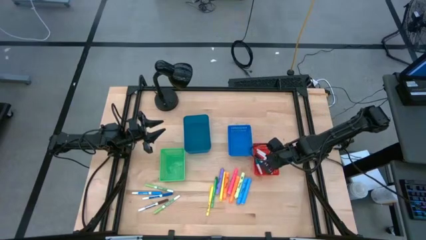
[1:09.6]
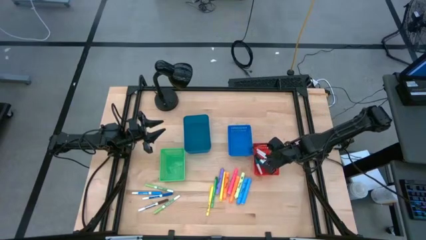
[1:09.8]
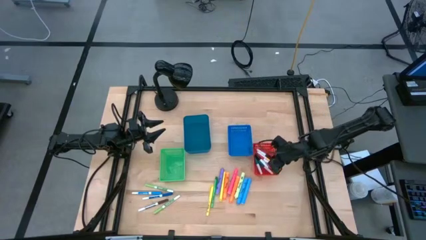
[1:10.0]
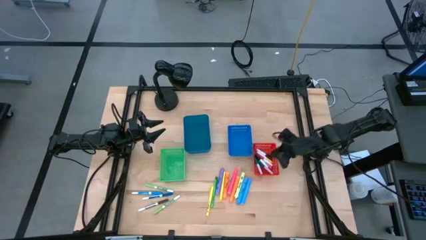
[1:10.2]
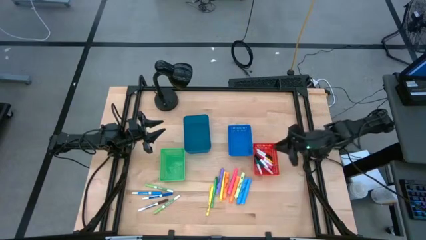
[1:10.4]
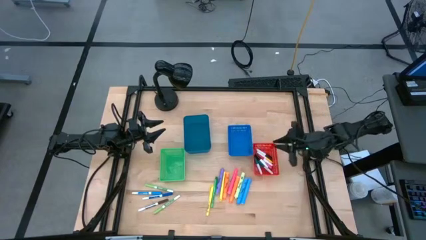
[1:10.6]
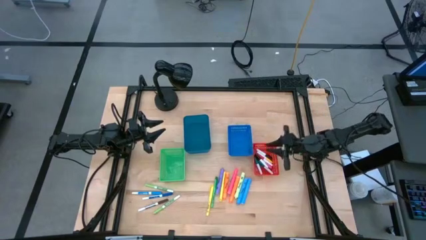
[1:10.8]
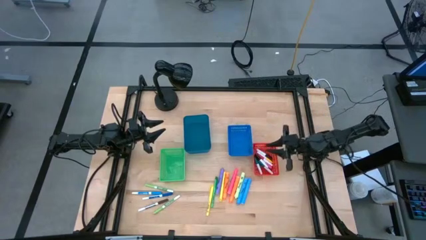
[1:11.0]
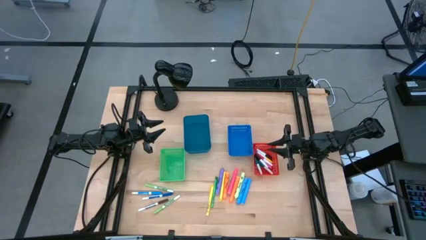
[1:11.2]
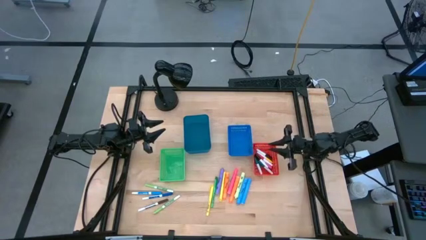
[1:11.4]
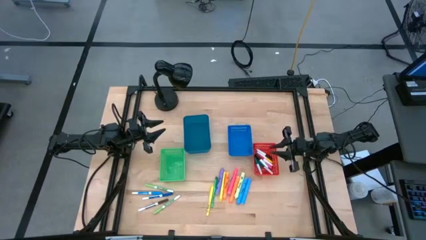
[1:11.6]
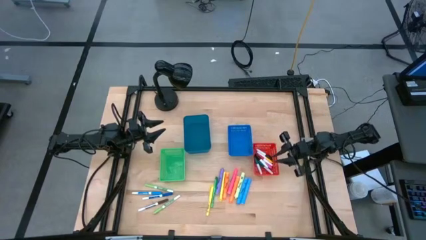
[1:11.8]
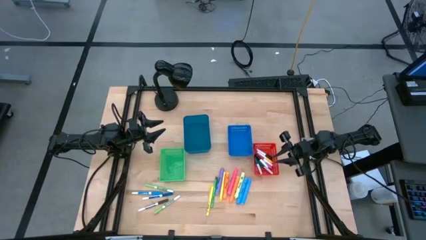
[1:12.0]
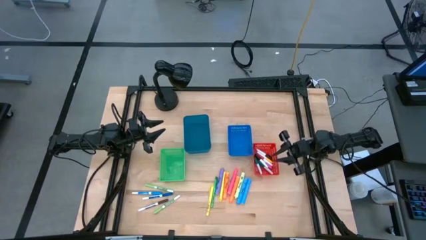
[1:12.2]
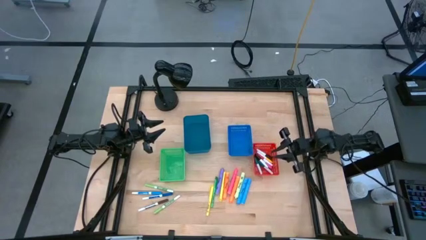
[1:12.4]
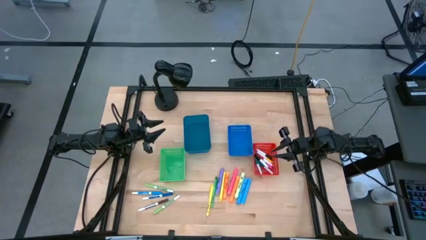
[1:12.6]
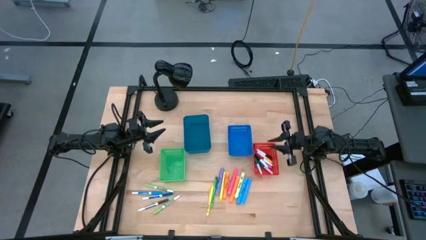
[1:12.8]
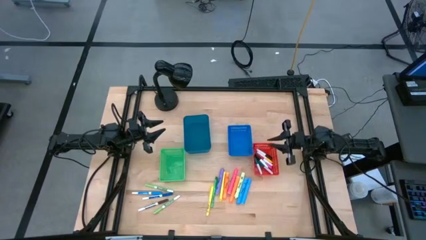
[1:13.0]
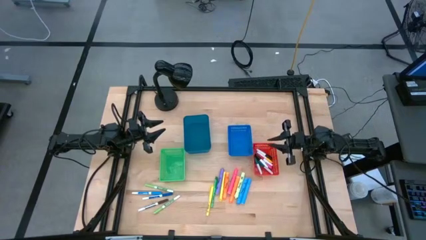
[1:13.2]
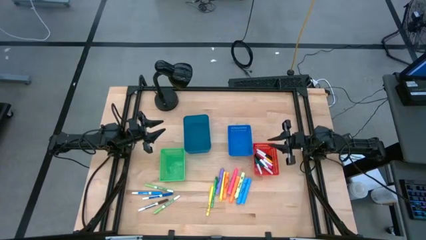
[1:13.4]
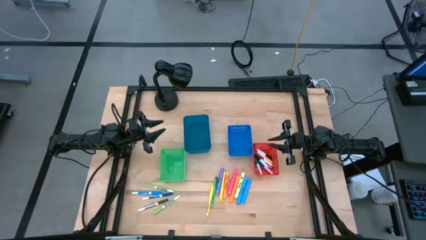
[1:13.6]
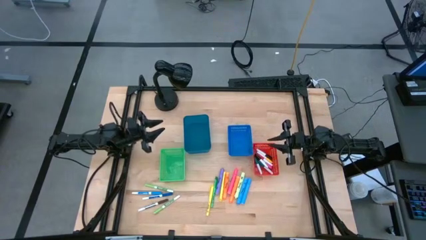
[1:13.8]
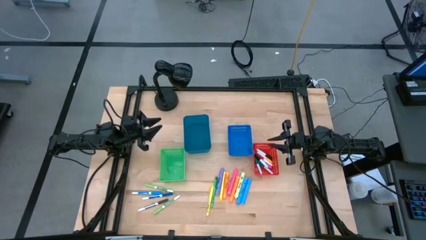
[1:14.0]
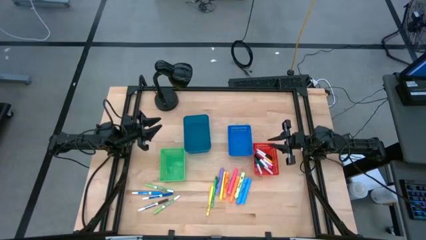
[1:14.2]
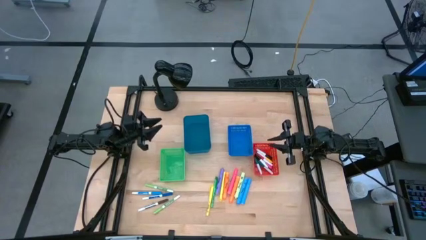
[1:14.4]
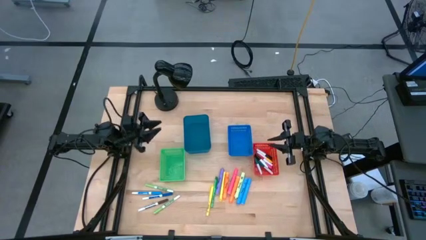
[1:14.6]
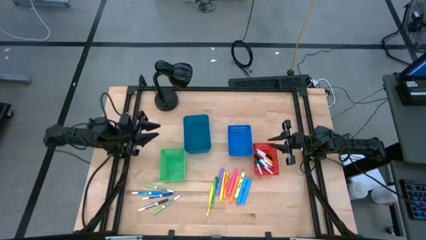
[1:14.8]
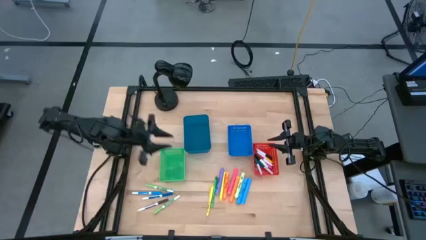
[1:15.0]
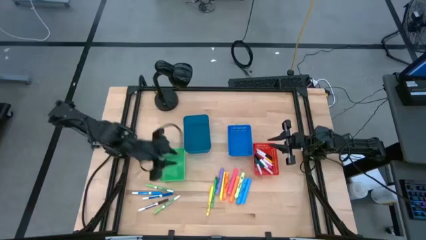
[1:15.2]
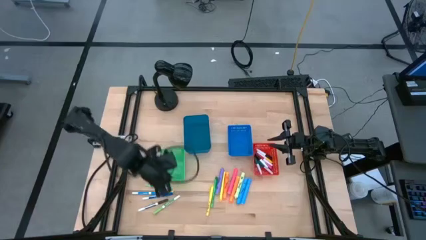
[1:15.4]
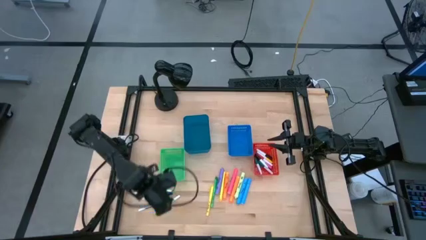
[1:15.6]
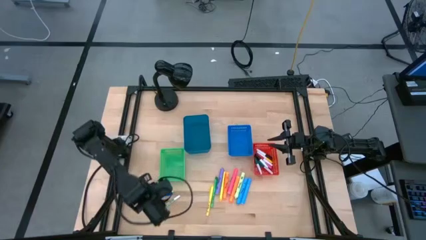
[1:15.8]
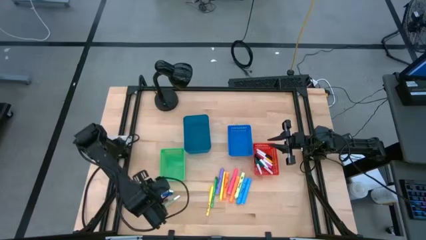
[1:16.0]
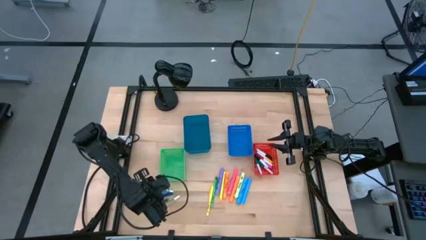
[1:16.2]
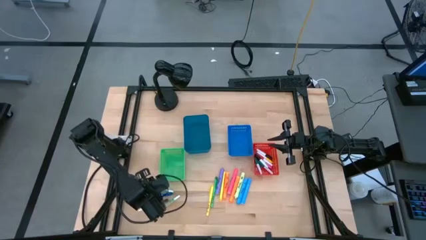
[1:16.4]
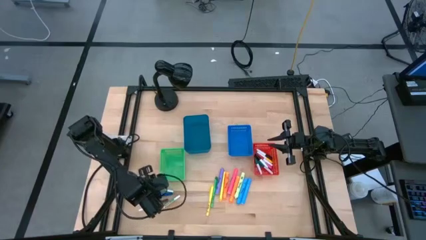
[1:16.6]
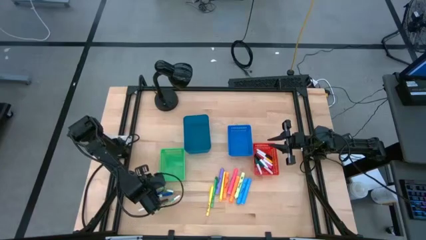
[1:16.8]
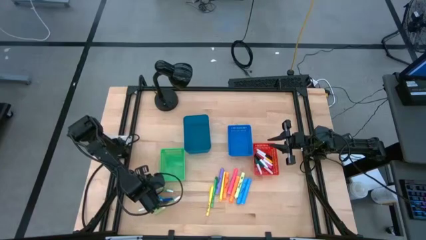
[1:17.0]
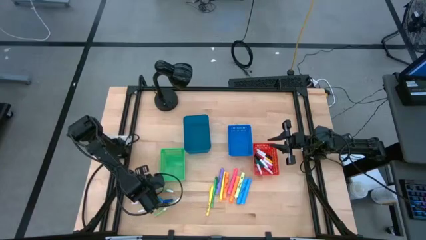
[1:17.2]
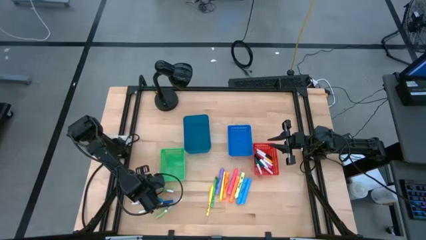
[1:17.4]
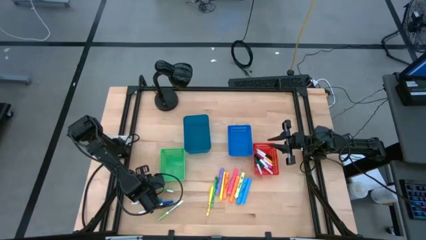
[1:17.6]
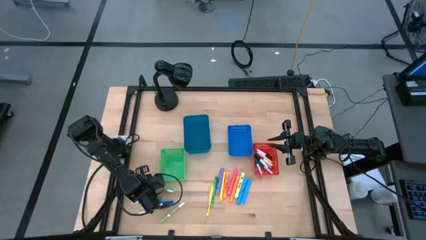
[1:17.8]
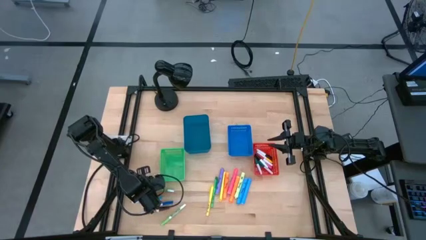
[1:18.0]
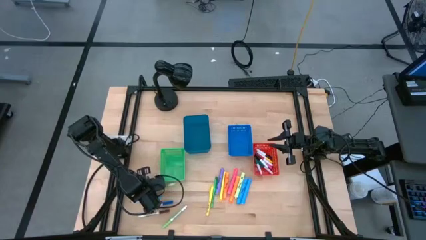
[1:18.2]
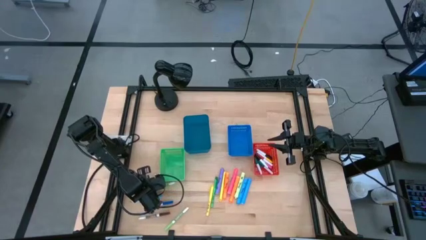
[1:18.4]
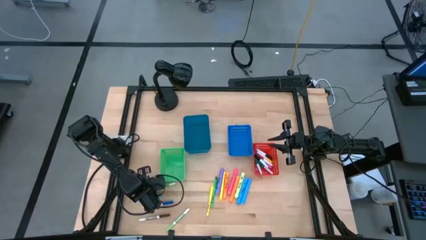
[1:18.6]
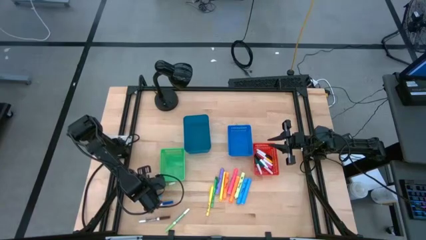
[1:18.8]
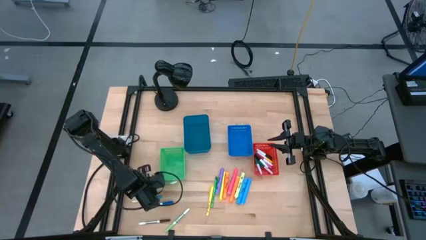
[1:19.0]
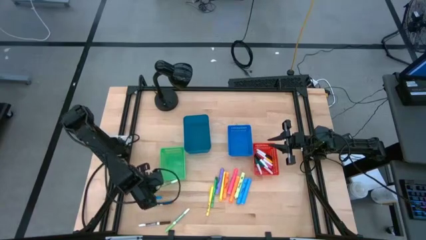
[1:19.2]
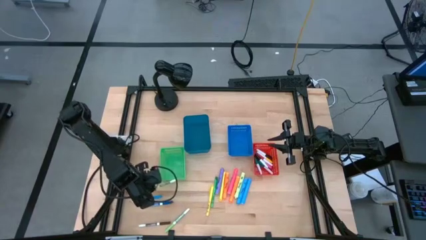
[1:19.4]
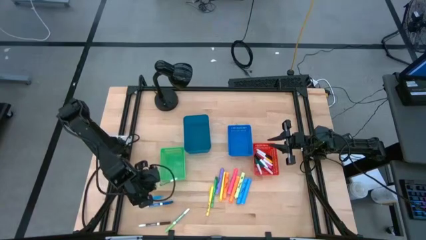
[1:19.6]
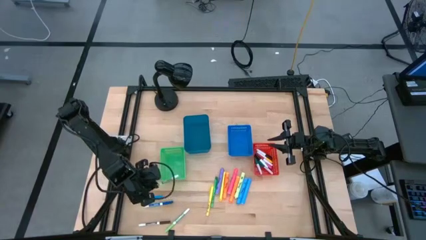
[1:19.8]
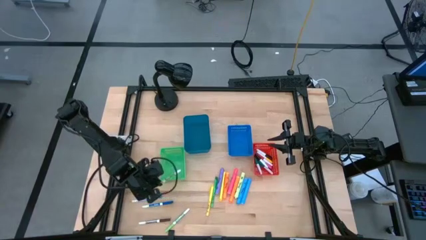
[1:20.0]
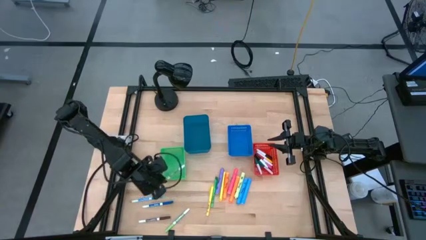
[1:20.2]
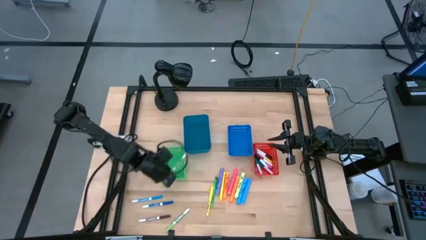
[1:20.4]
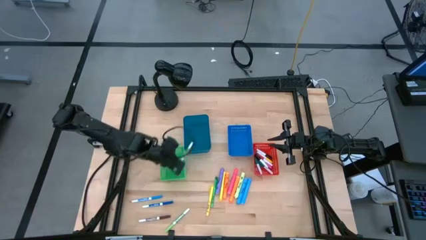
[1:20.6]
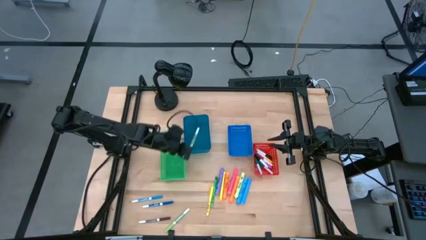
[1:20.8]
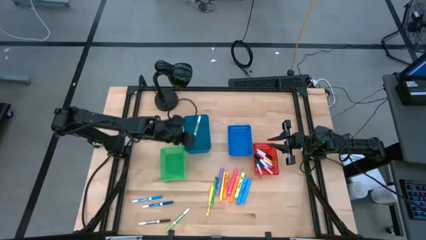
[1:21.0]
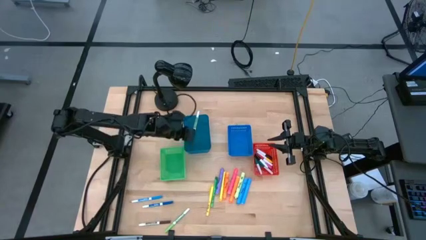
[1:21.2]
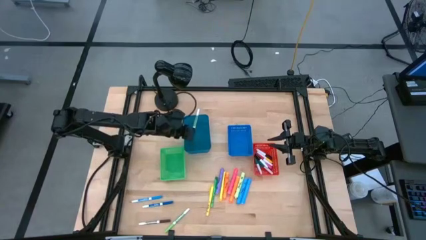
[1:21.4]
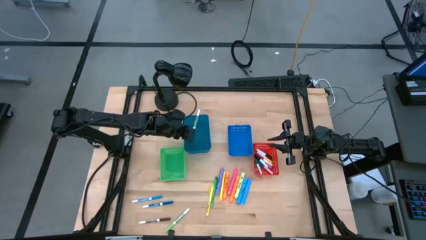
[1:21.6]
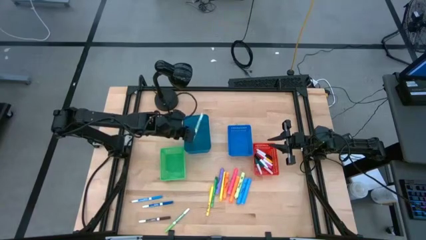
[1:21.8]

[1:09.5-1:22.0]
Task: Pick & Place Markers
Put the top green marker pen into the dark blue bin
